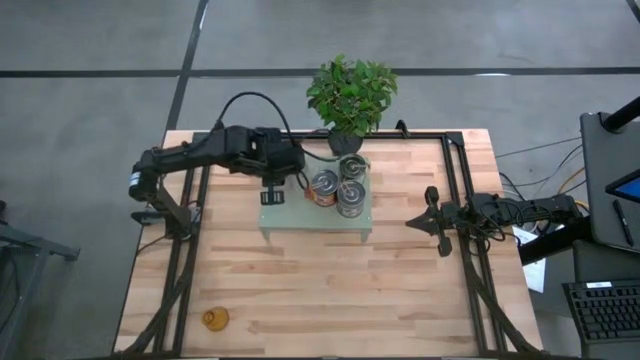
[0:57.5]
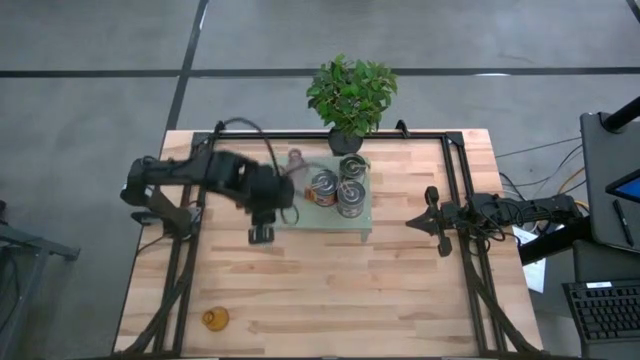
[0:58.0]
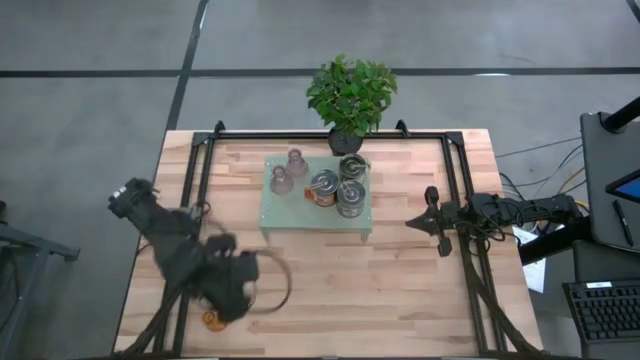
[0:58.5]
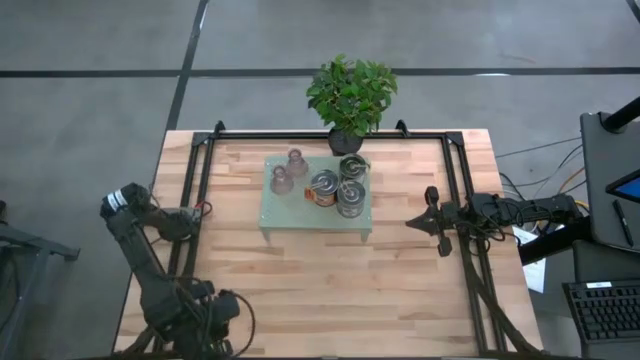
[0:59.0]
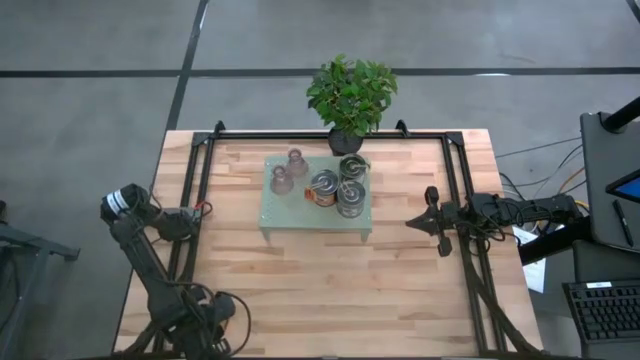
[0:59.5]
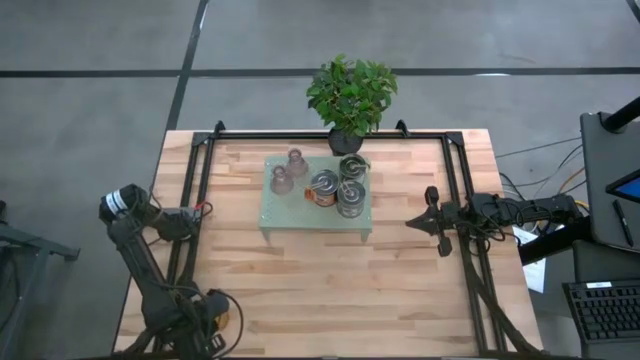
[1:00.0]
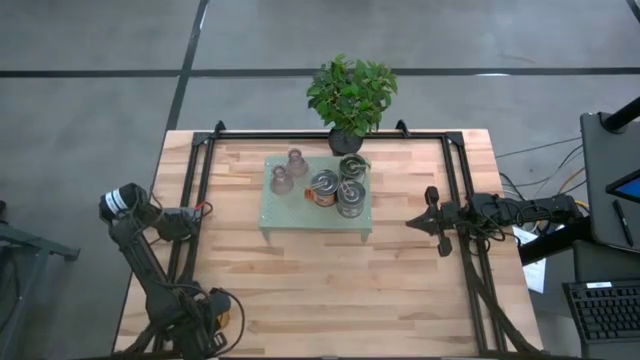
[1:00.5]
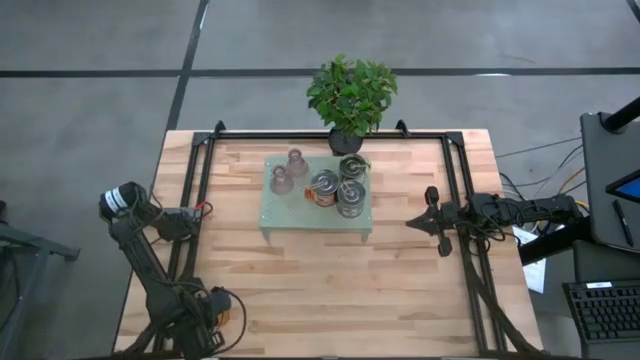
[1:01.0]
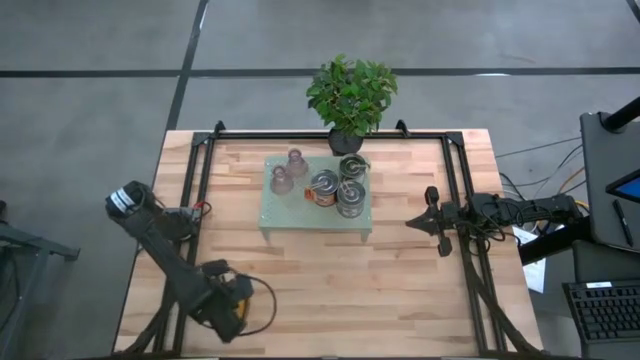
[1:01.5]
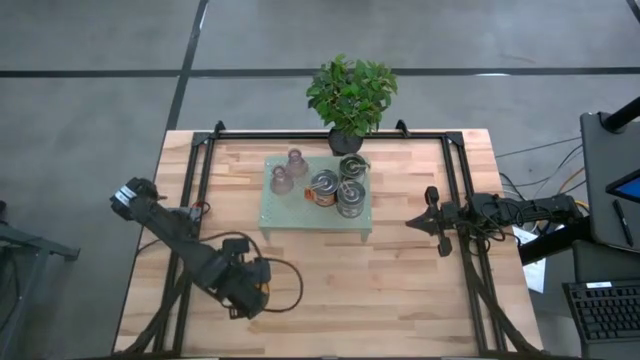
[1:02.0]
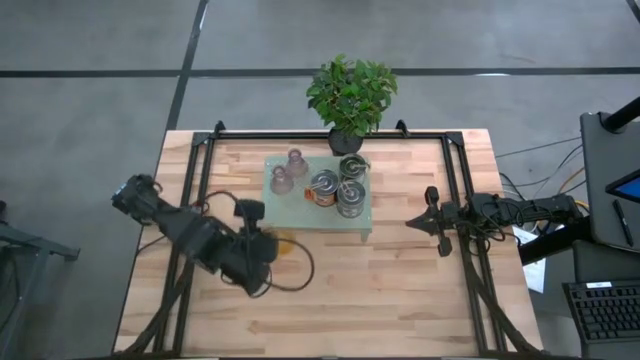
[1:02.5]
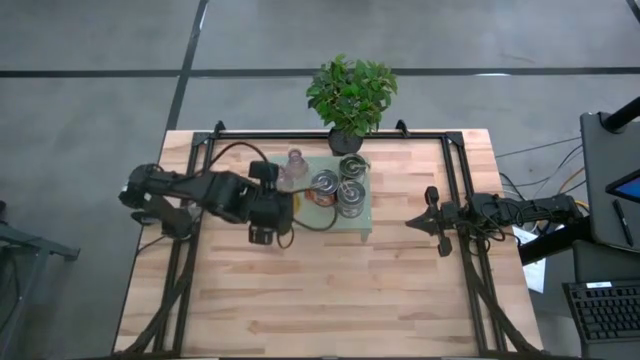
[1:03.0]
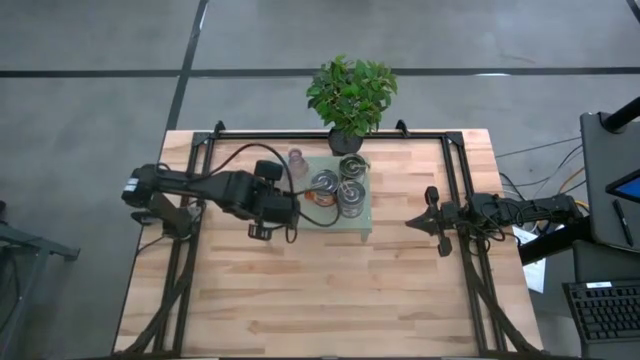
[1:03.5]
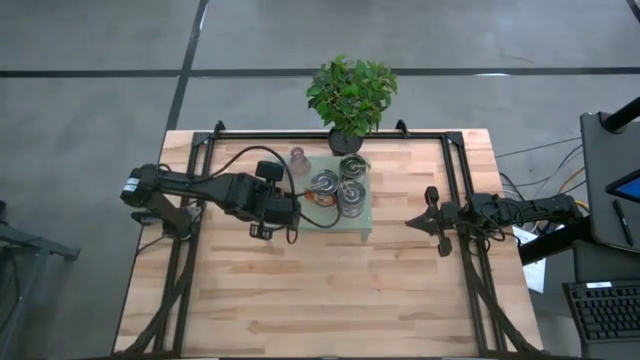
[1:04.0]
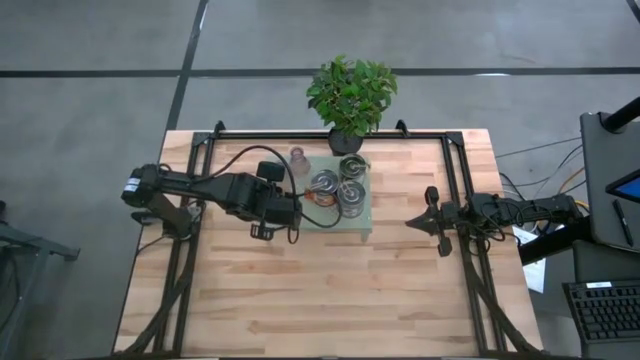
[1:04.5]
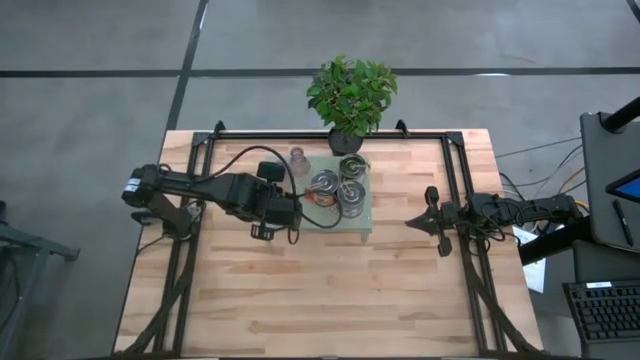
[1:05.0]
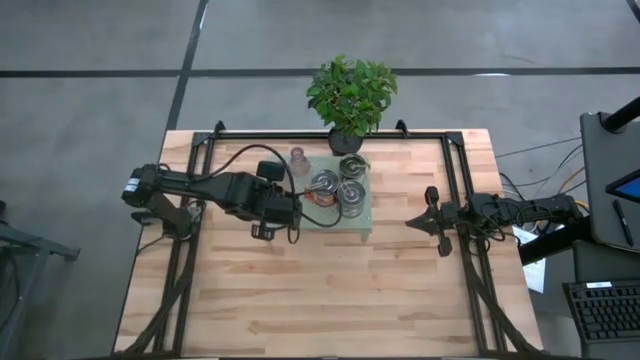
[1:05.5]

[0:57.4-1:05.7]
Task: Pick & Place candle stick holders
Put the gold glass candle holder on the shelf

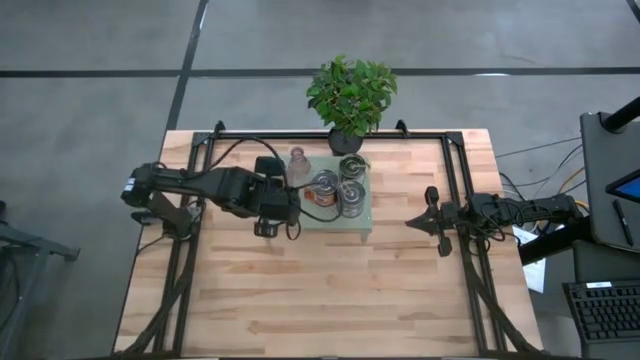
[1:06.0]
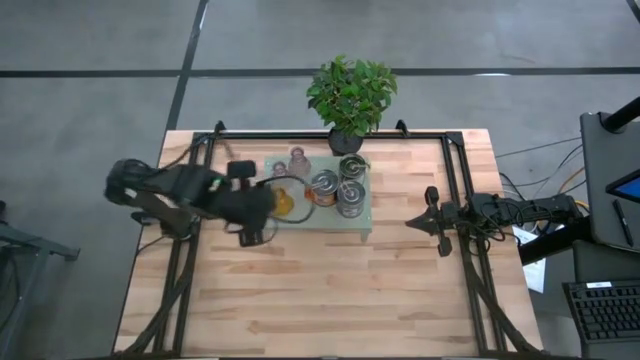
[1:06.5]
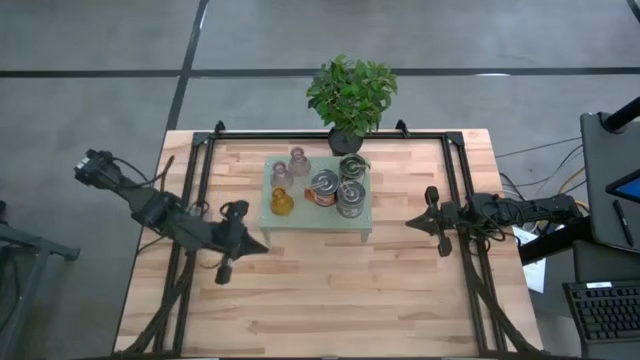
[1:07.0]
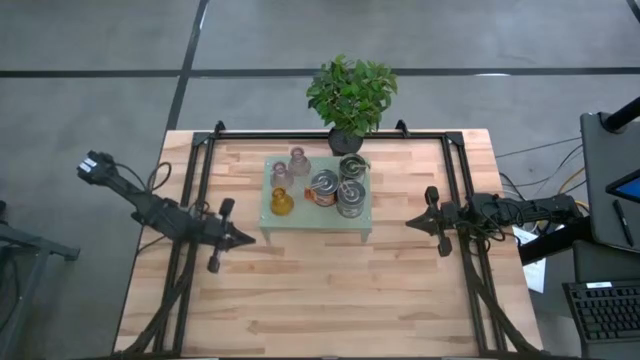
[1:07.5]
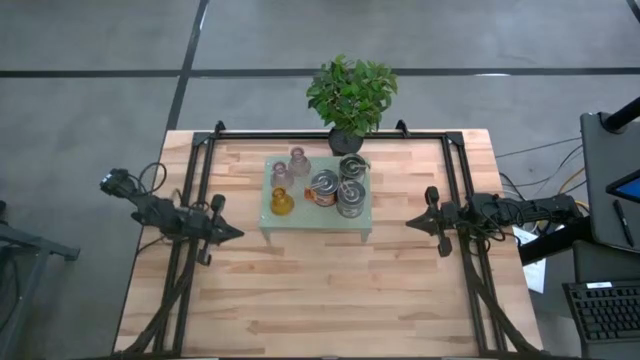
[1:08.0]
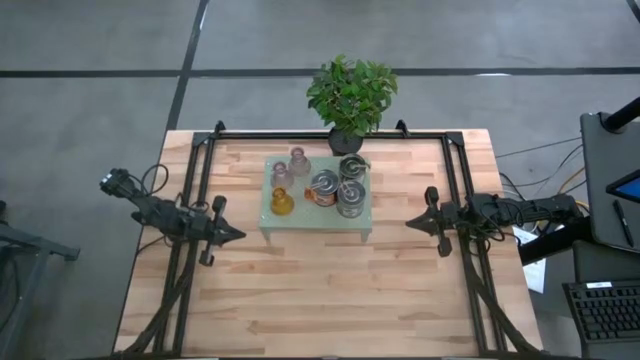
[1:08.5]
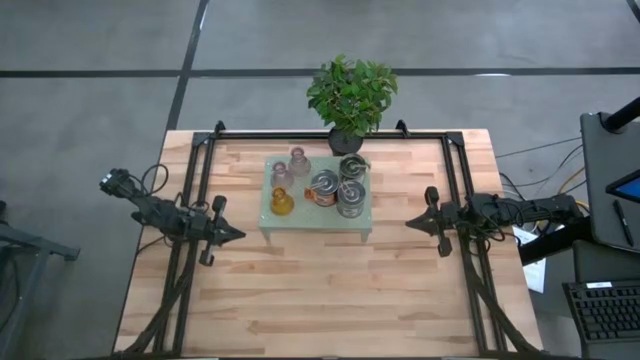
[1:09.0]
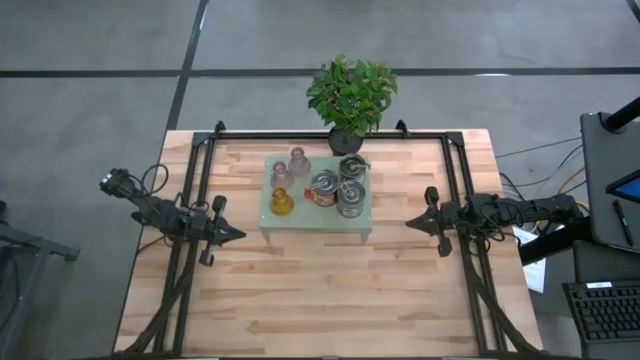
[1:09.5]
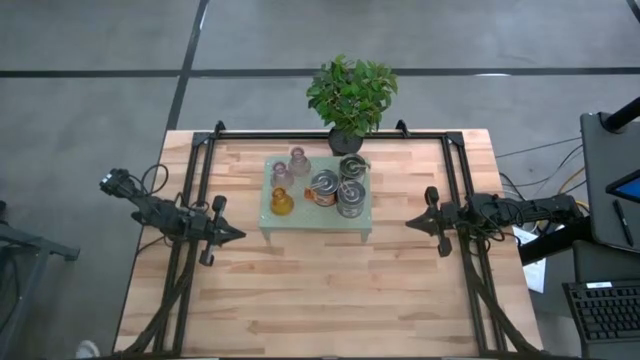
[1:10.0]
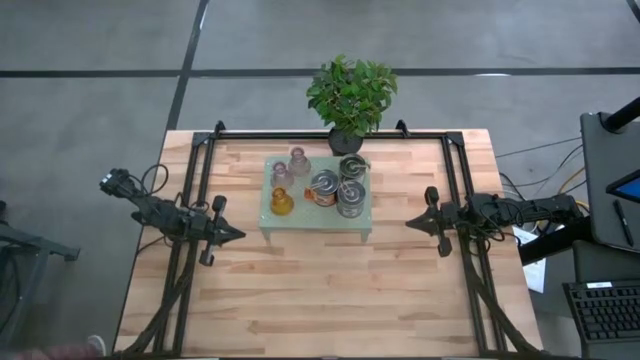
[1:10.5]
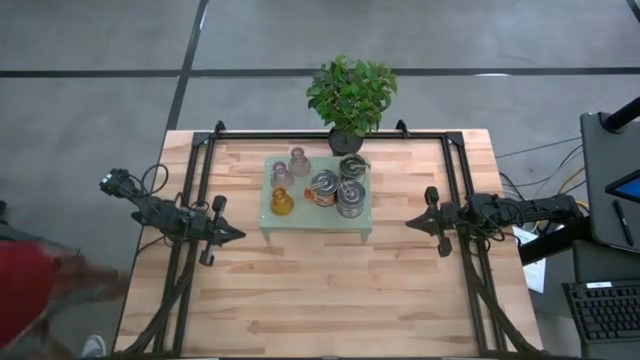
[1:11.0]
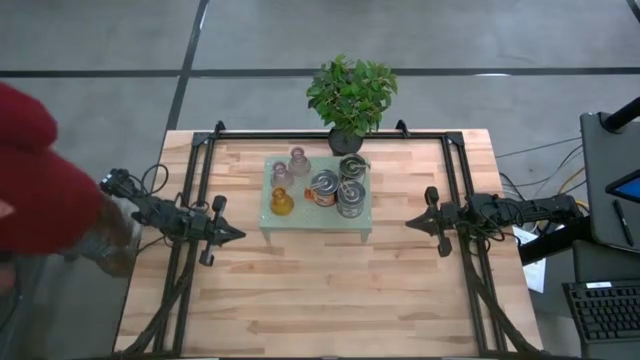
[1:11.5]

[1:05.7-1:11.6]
Return to Home Position
